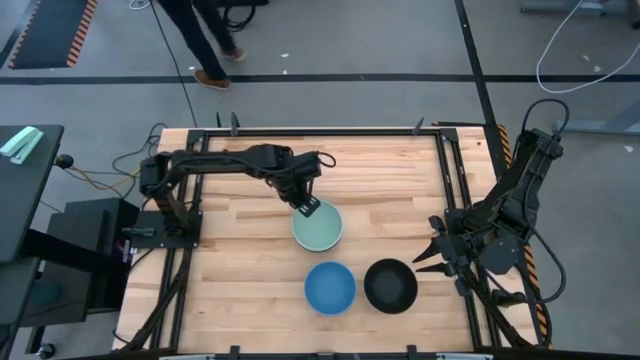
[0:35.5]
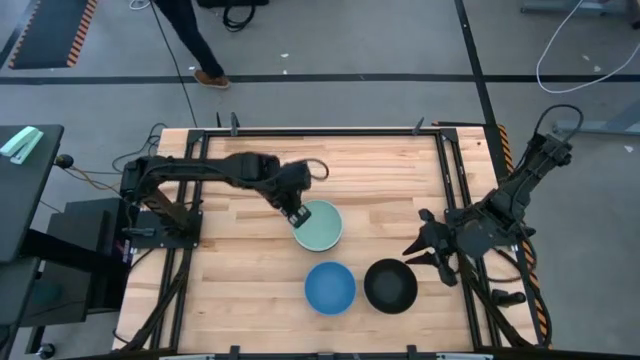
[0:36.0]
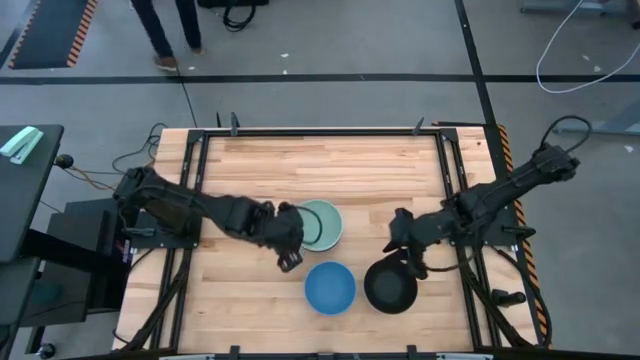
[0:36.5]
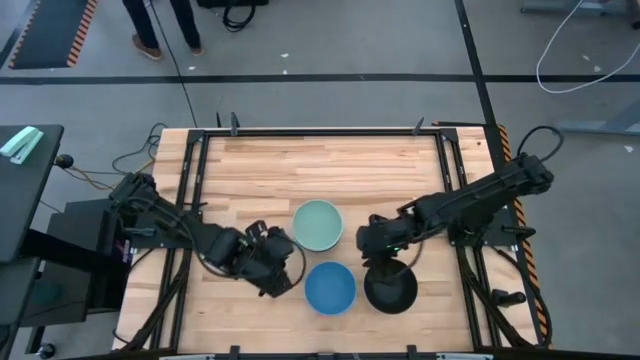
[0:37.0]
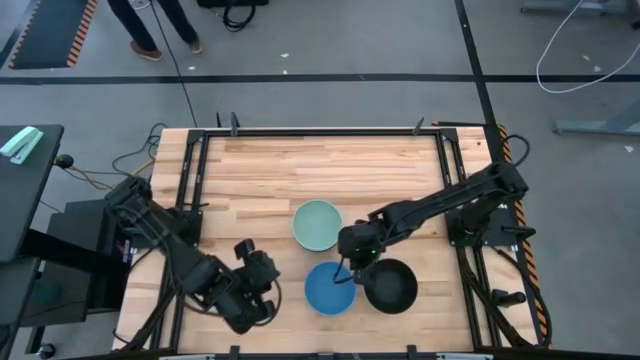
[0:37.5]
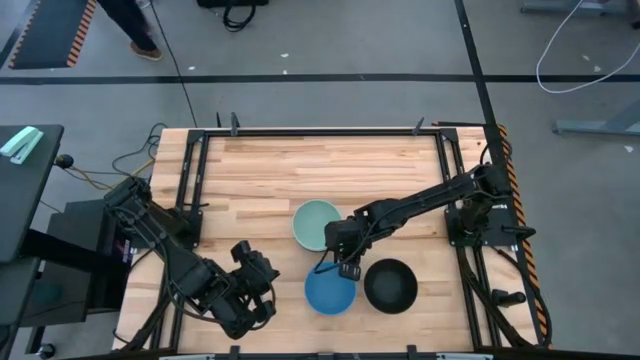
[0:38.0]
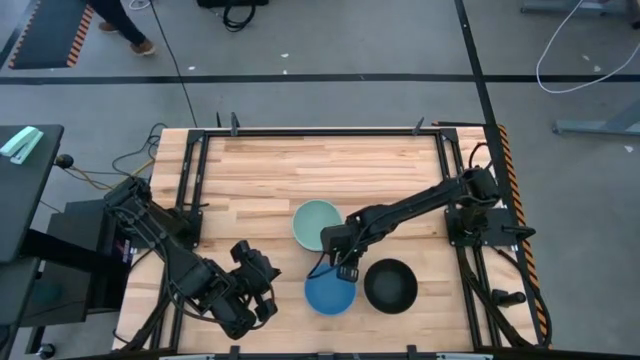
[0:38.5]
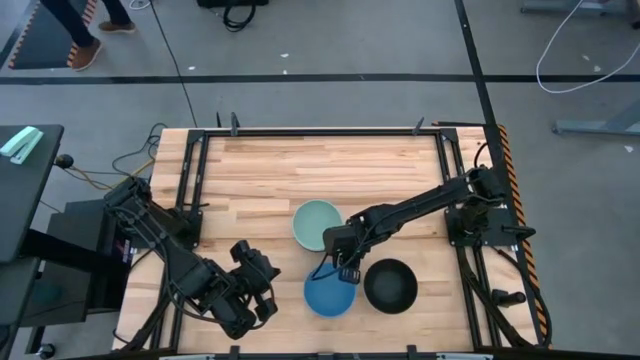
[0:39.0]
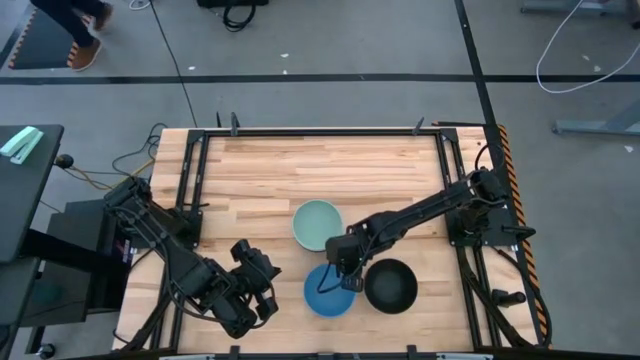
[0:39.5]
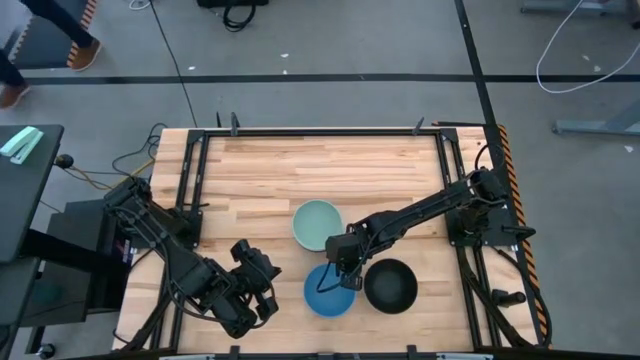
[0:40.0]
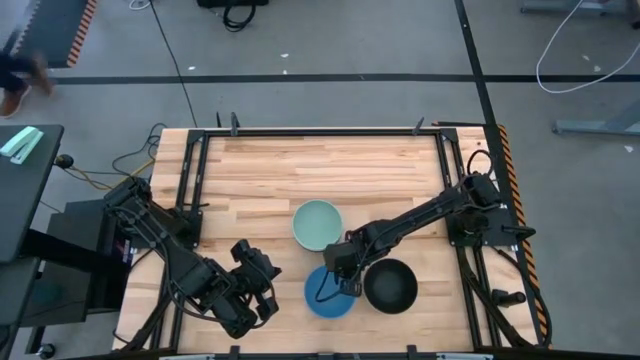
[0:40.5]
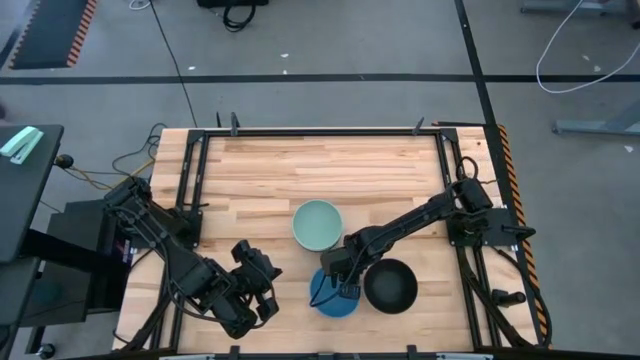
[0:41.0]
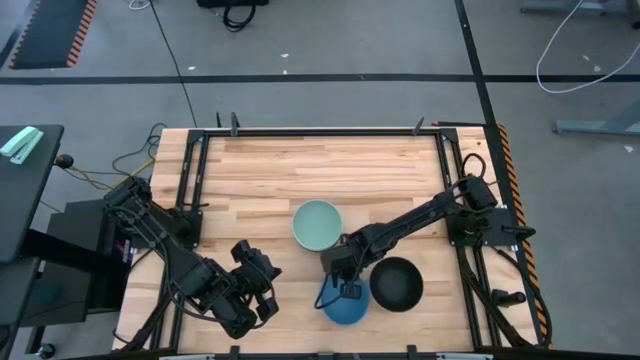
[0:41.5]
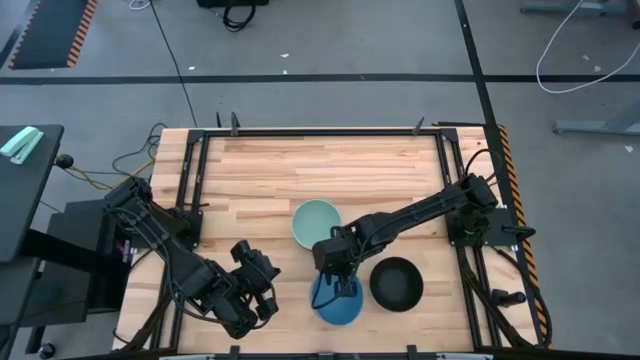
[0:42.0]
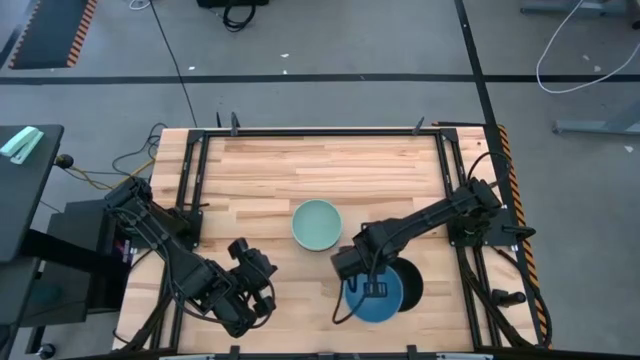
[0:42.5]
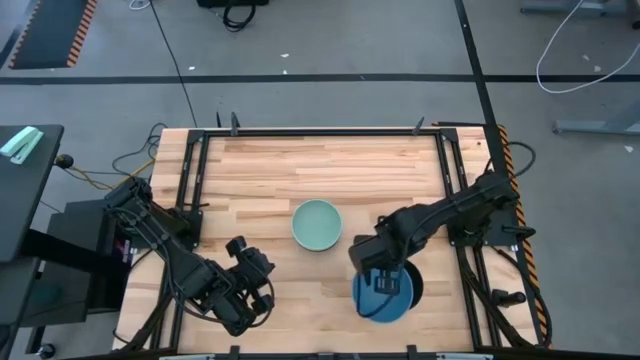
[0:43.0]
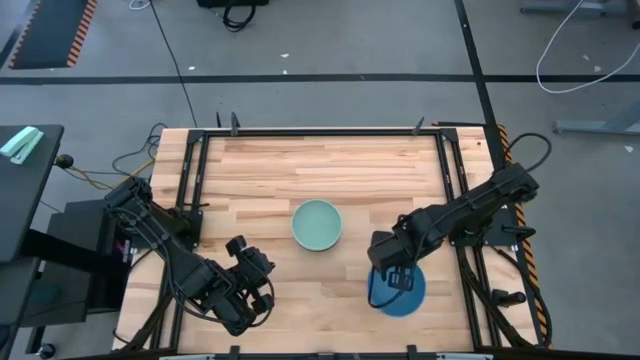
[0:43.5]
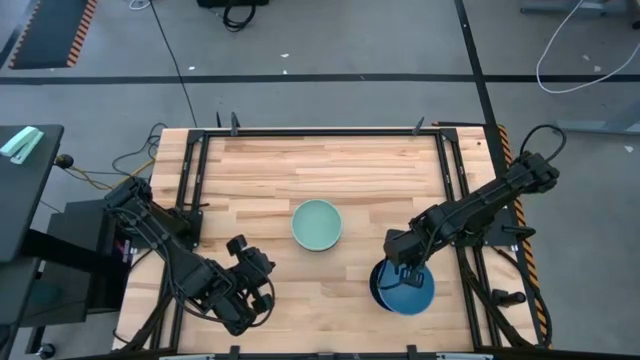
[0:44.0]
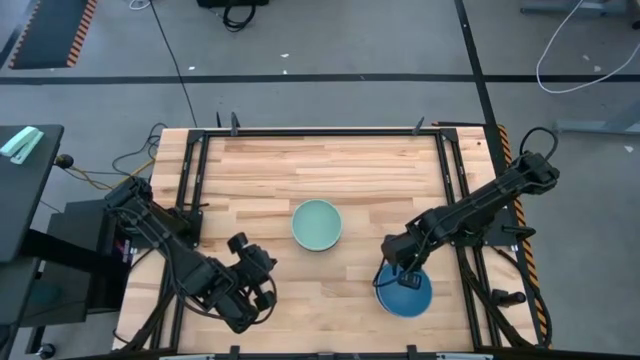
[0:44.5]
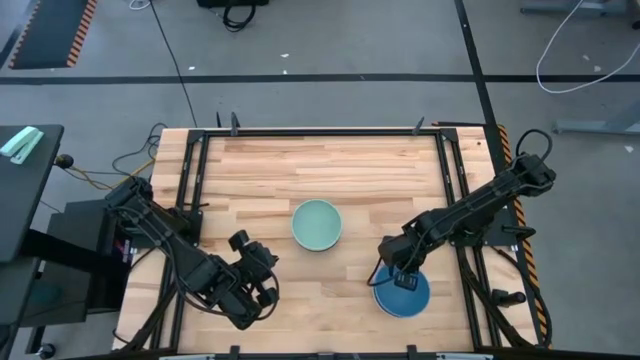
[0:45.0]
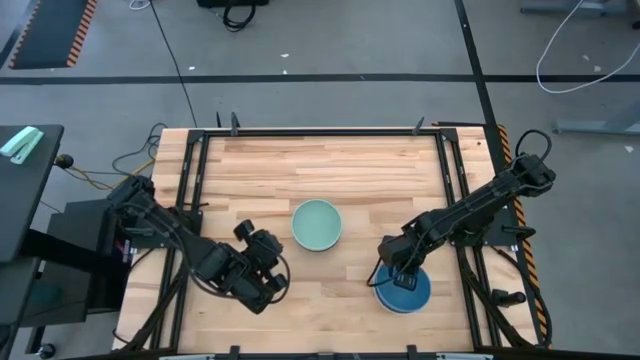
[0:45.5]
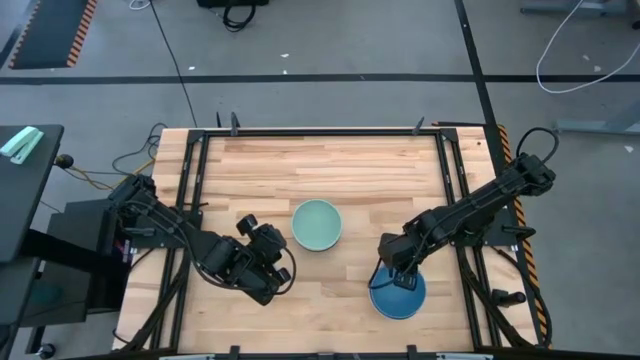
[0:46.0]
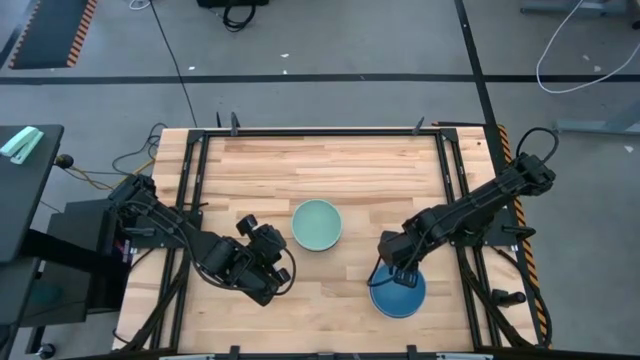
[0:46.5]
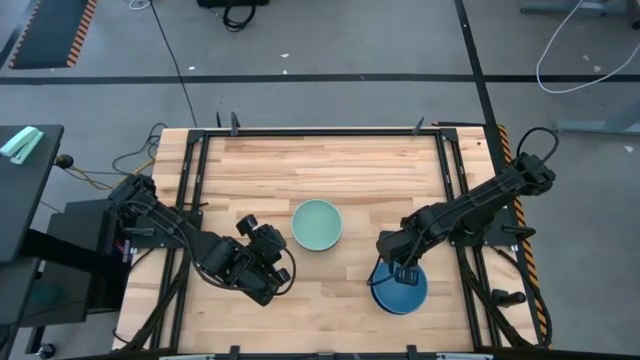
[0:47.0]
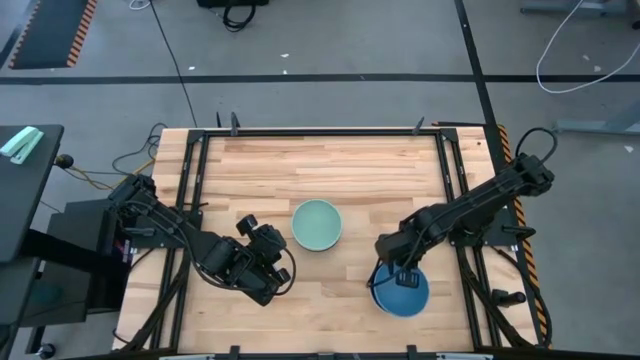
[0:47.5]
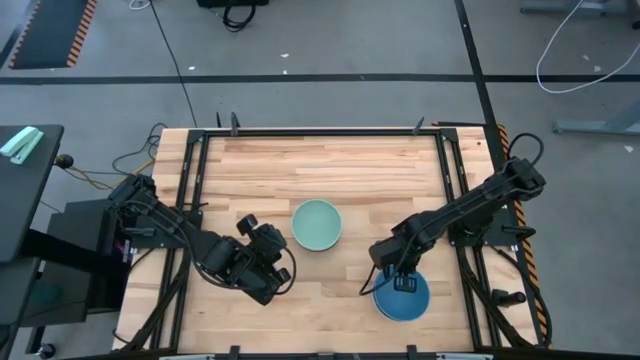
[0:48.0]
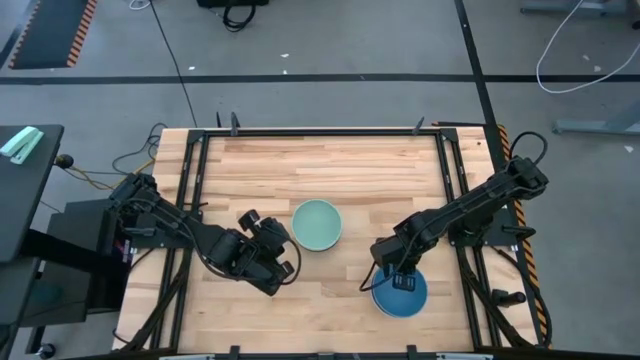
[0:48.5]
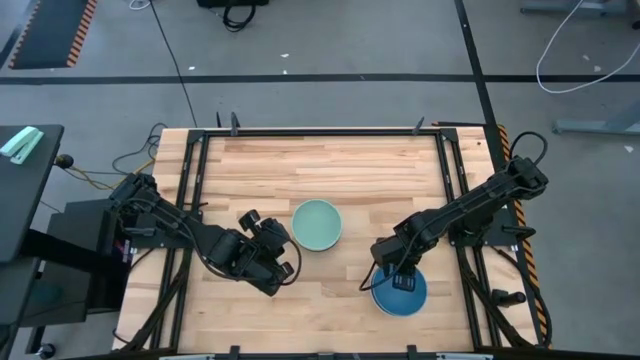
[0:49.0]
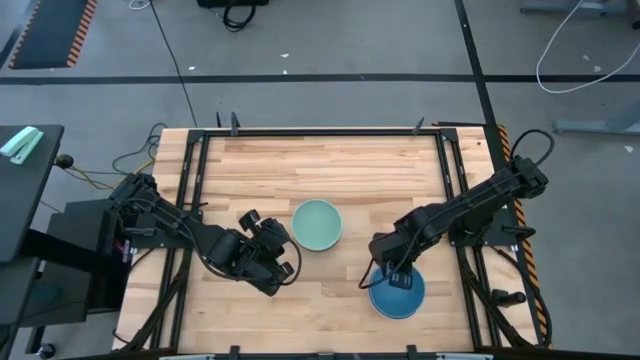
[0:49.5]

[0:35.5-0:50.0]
Task: Nest bowls inside each other
Stack the blue bowl on the black bowl

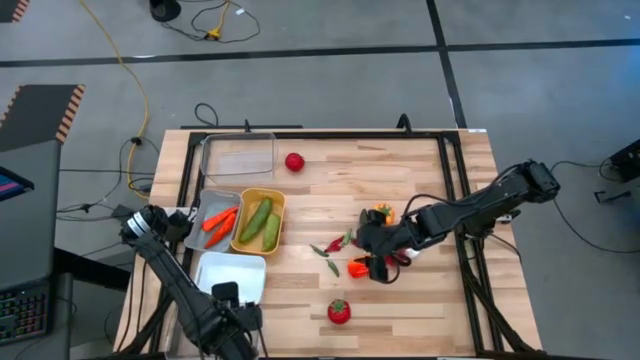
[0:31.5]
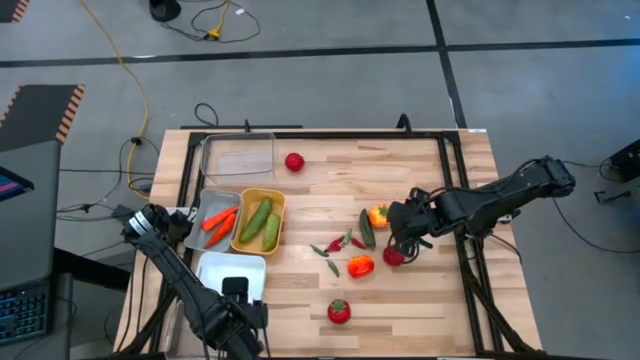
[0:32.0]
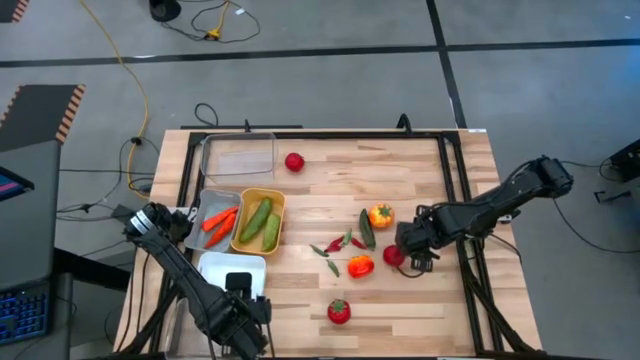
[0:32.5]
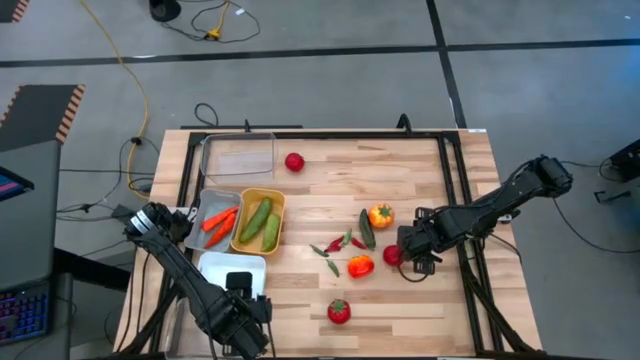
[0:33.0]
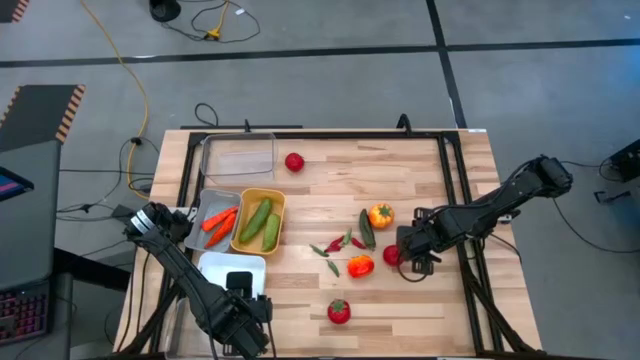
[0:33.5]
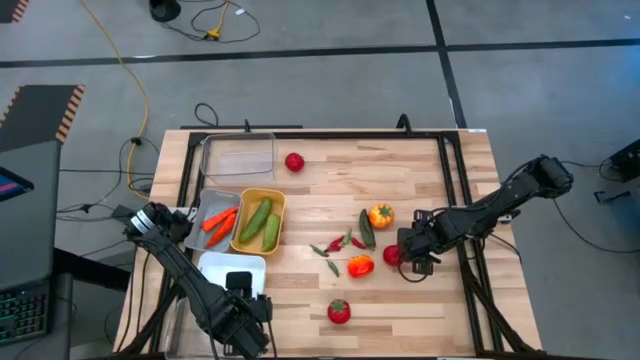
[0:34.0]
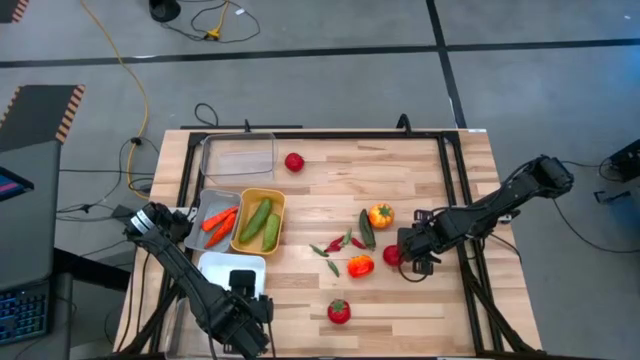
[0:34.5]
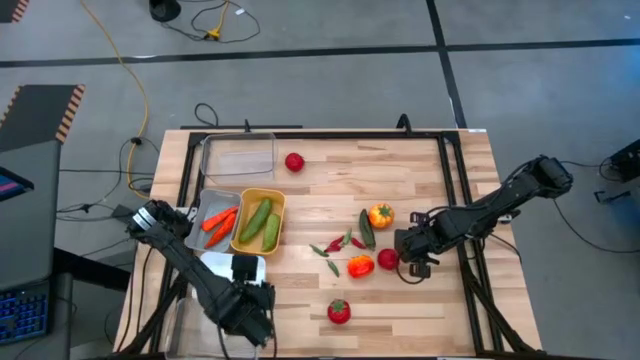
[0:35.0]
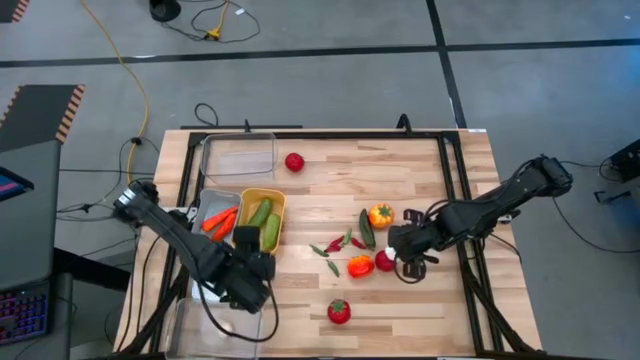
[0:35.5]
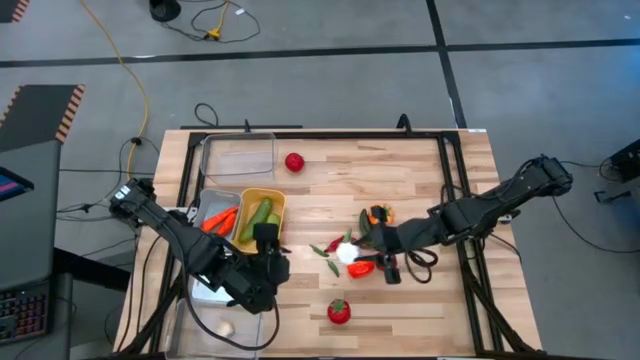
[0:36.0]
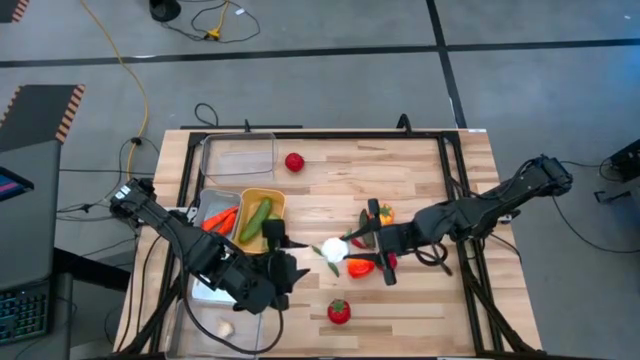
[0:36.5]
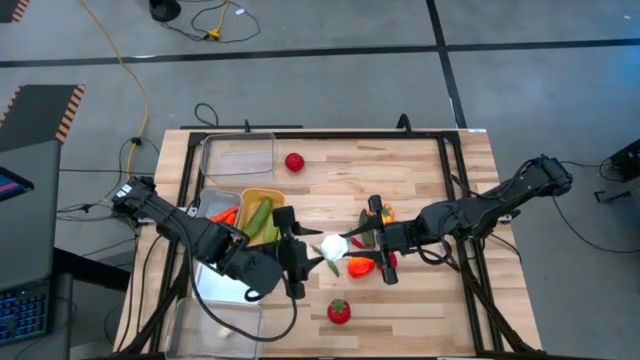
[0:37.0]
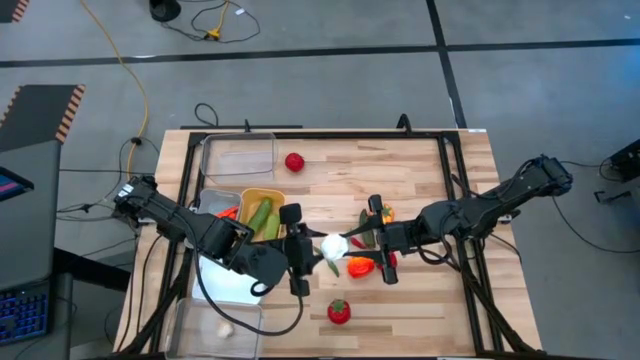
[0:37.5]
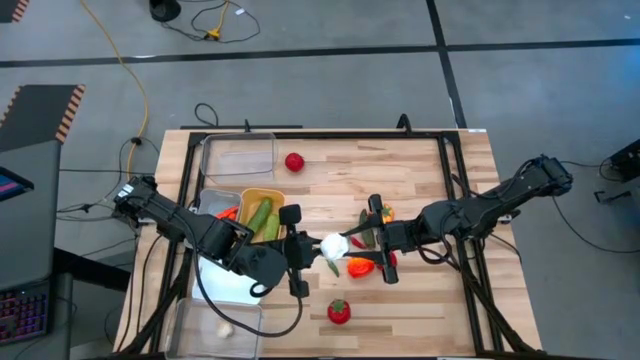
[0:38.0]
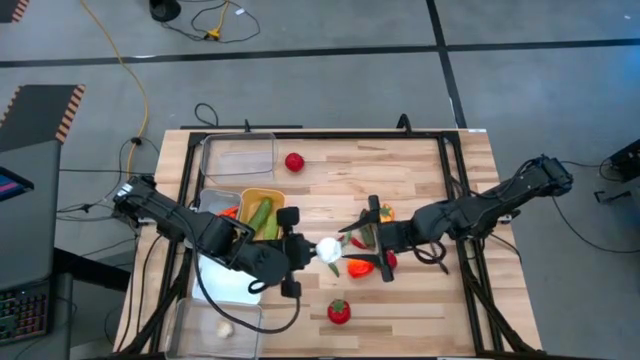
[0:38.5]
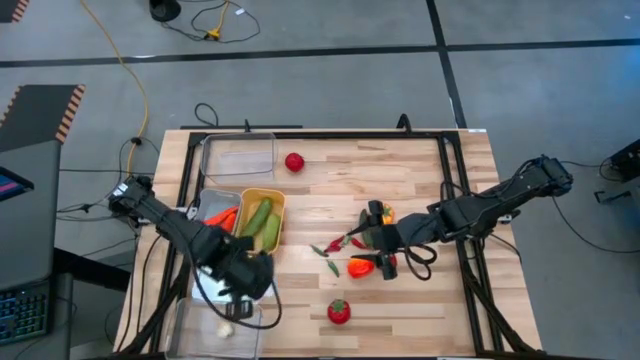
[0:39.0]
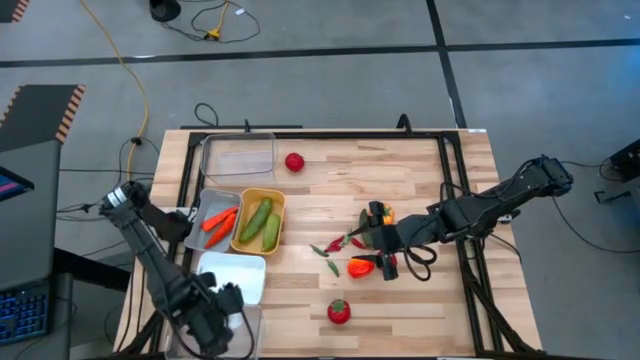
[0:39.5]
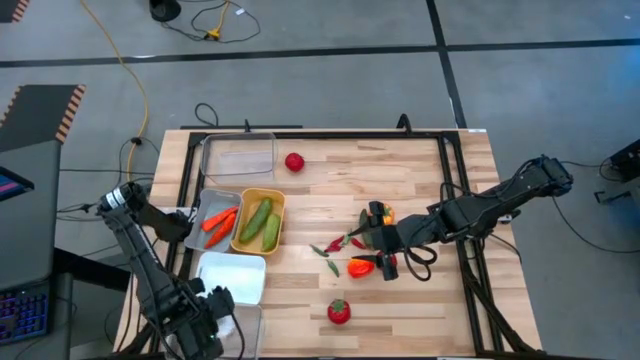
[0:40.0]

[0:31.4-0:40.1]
Task: Sort produce into baskets
Put the right garlic into the bottom transparent bin
